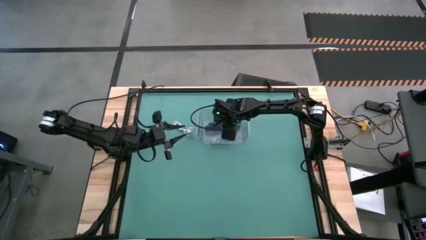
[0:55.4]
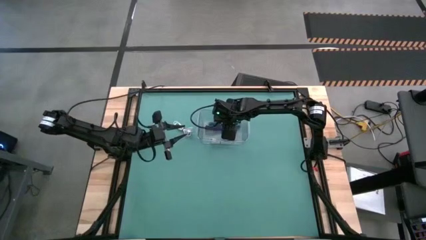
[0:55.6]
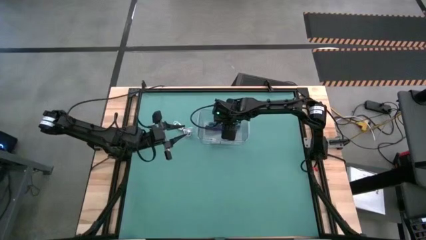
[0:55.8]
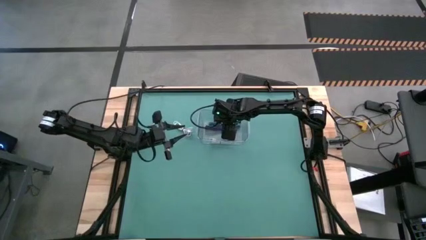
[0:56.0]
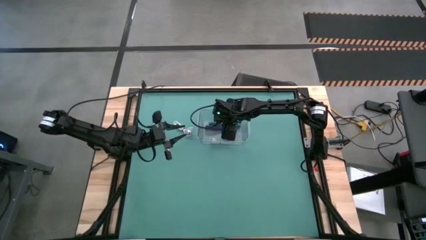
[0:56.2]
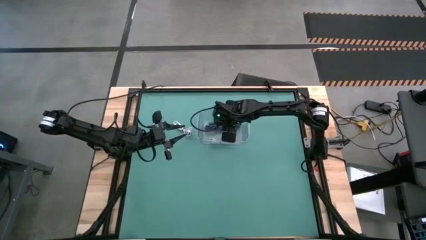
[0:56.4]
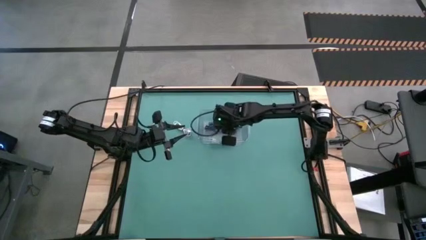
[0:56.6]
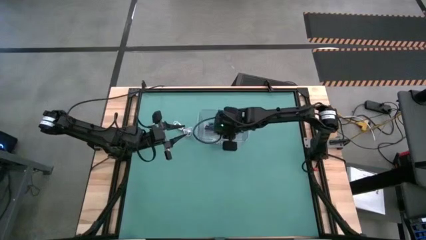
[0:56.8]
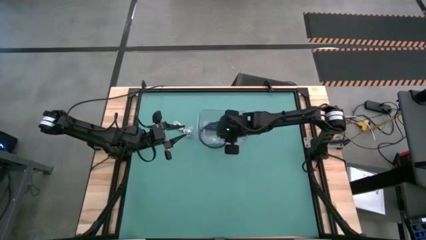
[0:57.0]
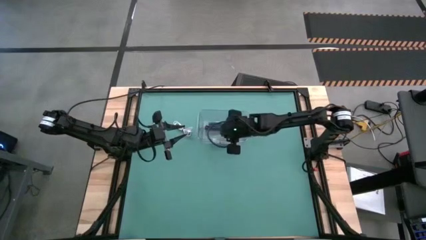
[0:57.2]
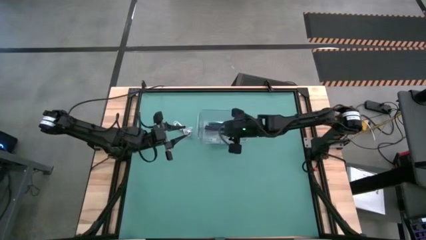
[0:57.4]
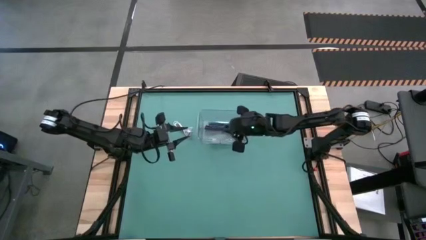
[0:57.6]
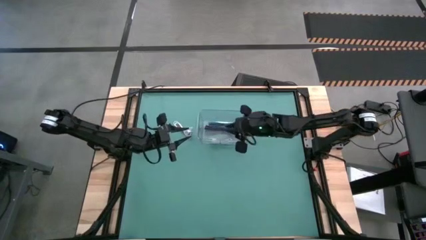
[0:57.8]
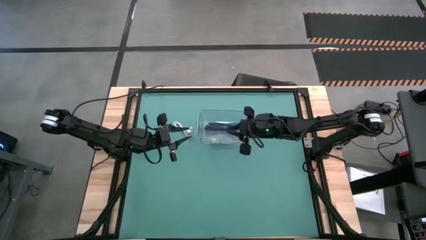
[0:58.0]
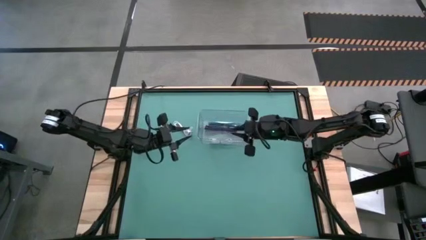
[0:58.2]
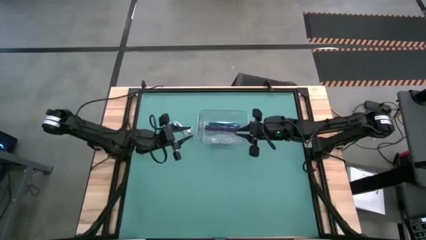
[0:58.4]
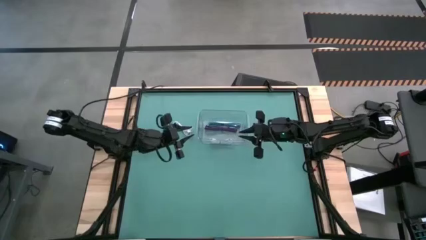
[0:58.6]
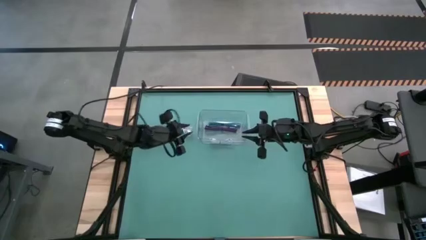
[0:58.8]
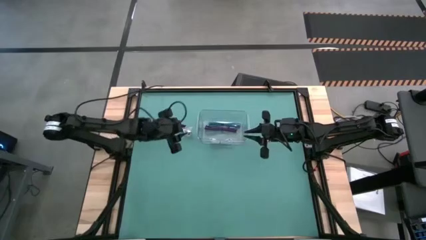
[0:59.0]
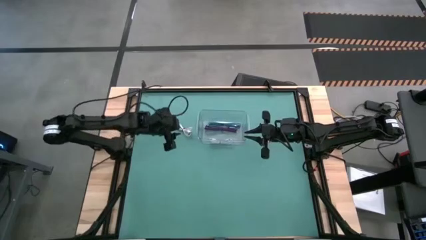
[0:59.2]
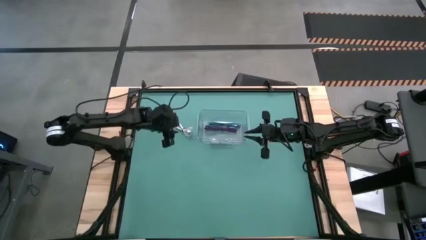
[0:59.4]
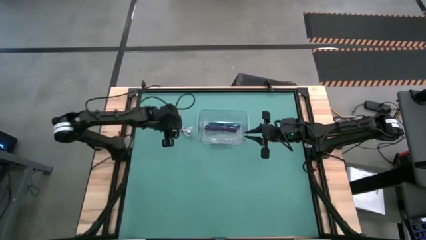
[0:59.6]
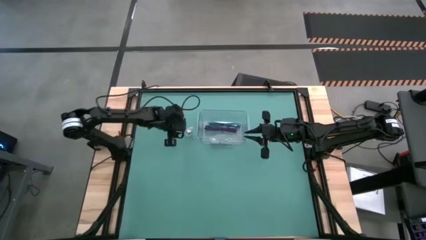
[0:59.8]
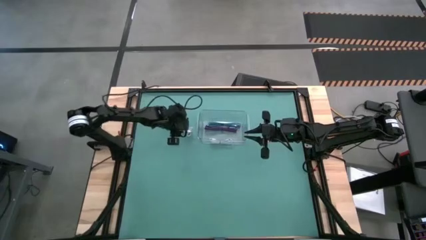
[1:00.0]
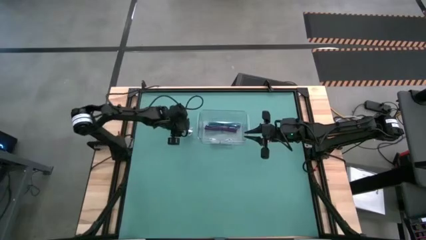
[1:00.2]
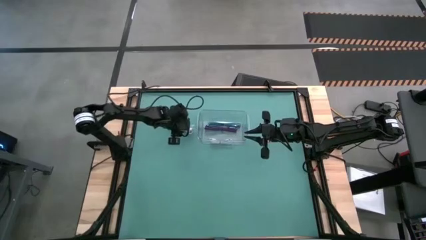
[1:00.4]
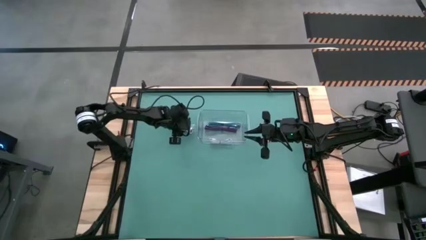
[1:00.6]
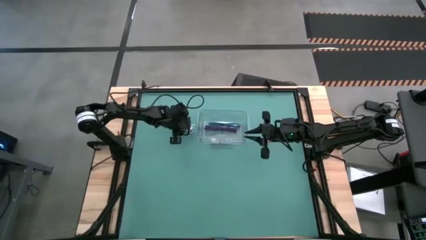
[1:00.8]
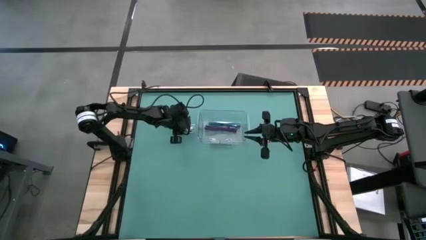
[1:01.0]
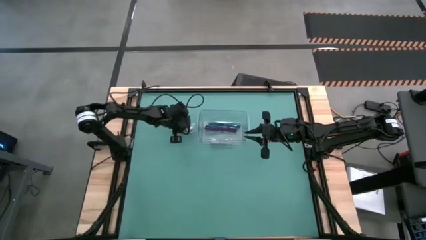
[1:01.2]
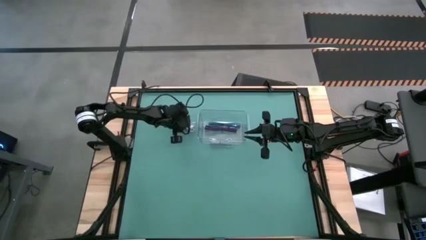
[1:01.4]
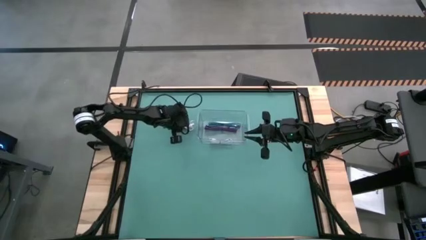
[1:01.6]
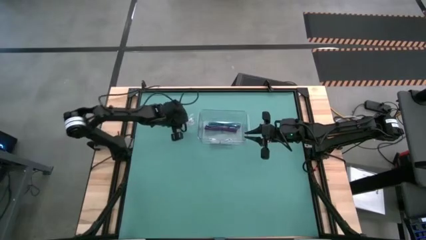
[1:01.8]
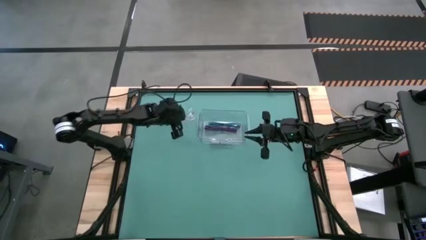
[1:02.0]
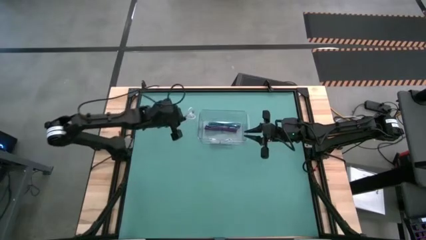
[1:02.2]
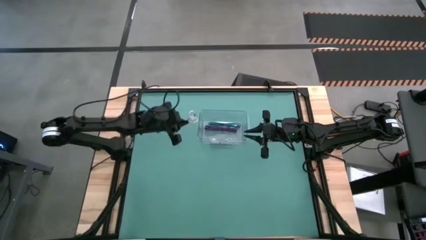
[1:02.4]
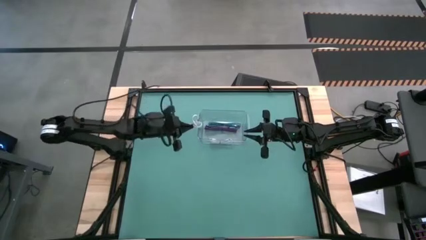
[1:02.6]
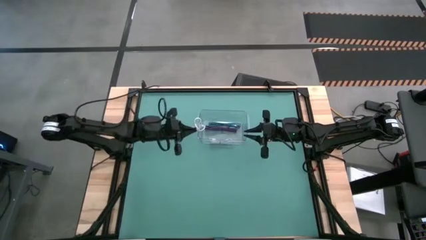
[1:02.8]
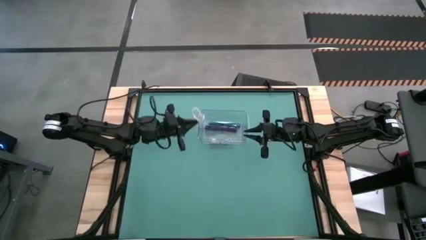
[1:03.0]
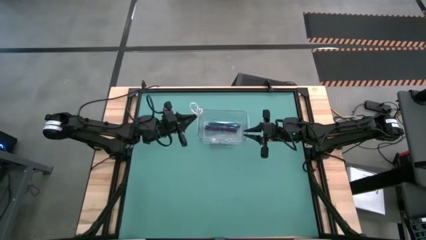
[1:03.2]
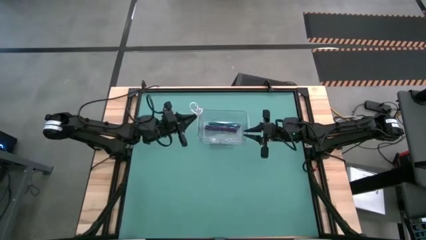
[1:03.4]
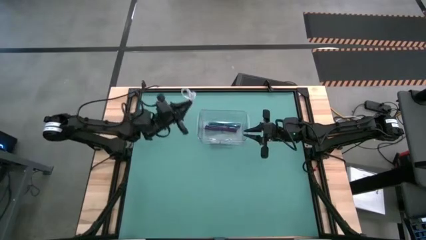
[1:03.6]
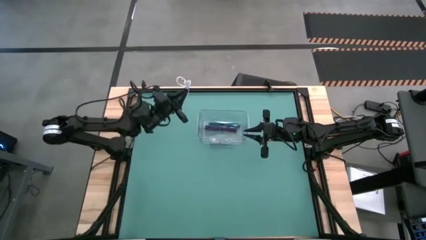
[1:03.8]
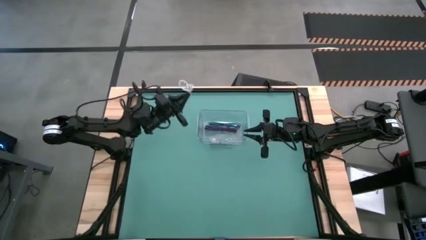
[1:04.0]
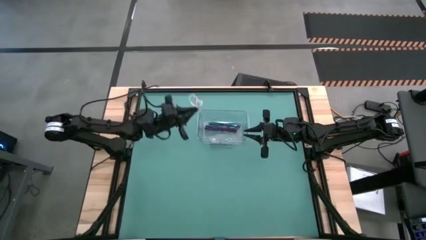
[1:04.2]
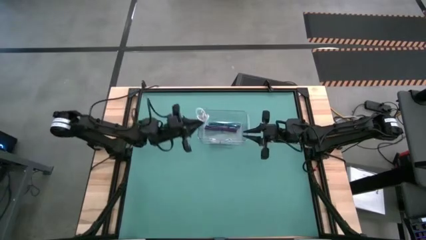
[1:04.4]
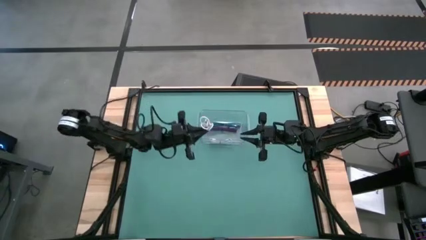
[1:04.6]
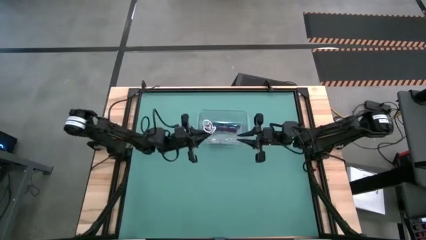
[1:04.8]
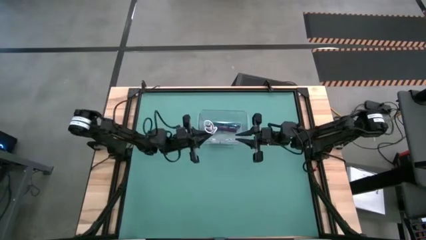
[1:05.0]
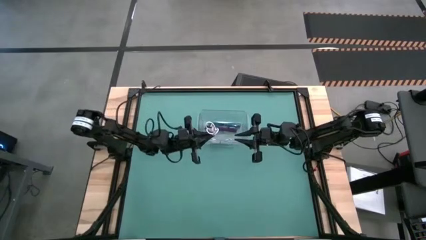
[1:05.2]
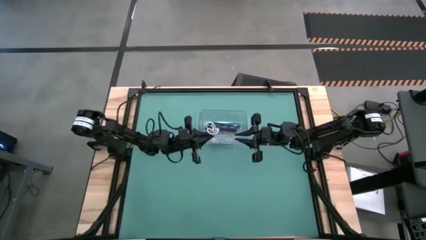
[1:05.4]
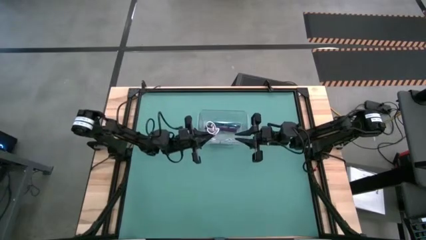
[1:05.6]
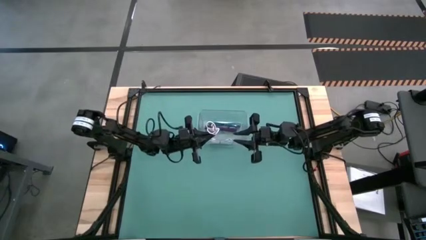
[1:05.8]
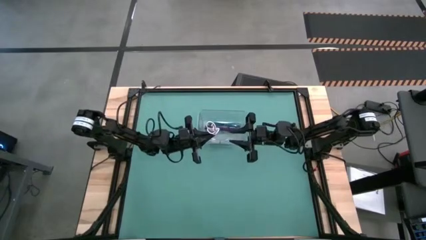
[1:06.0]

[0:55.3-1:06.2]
Task: Pick and place USB-C Cables
Put the white charger cable into the transparent container

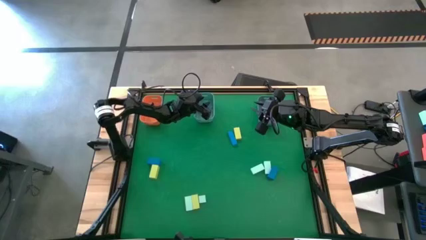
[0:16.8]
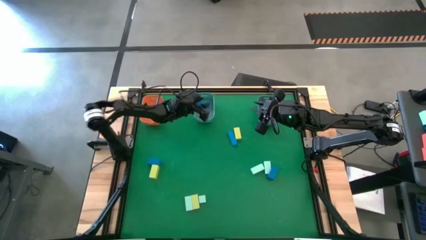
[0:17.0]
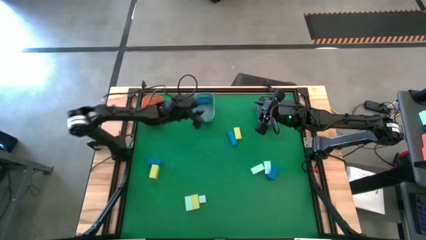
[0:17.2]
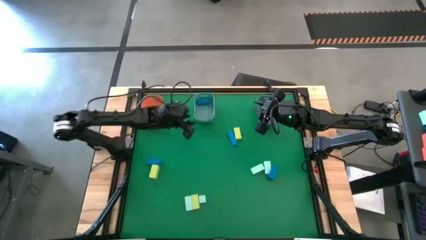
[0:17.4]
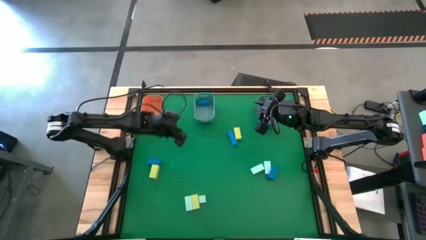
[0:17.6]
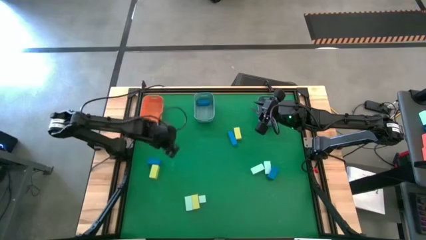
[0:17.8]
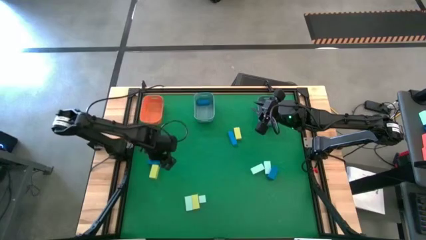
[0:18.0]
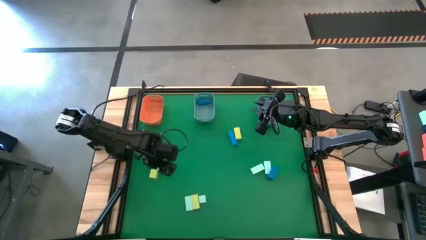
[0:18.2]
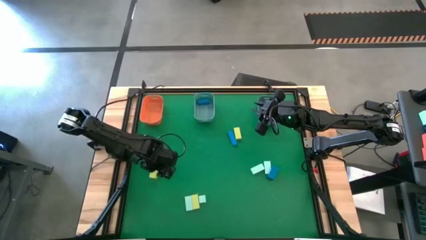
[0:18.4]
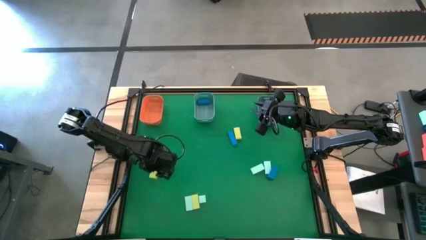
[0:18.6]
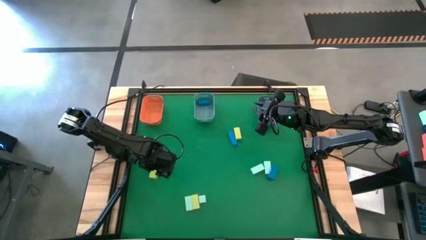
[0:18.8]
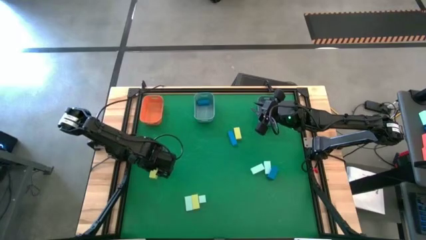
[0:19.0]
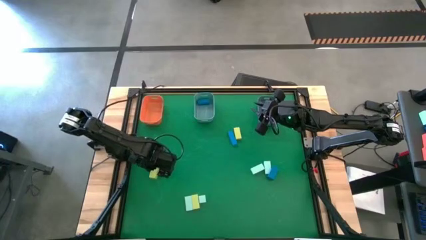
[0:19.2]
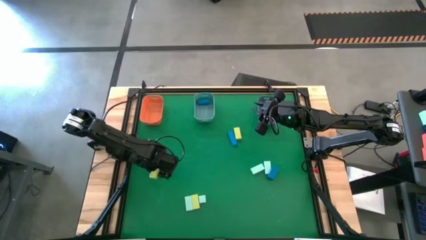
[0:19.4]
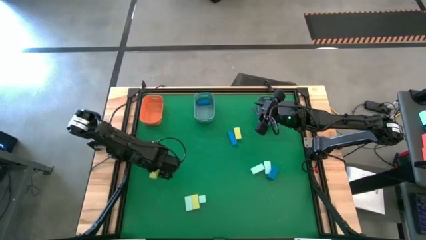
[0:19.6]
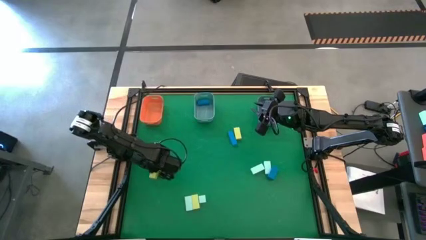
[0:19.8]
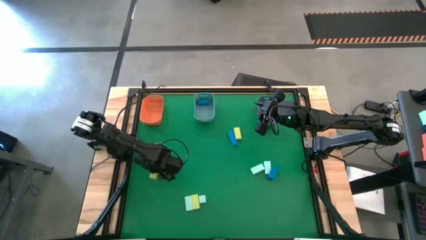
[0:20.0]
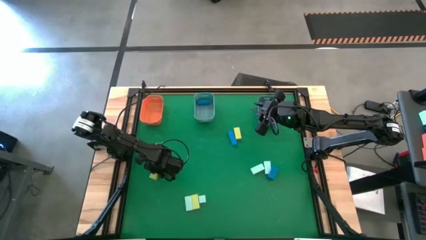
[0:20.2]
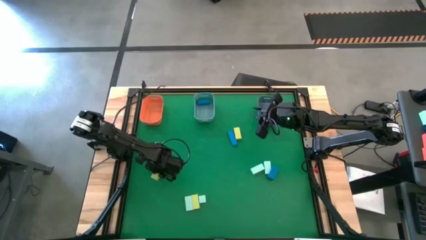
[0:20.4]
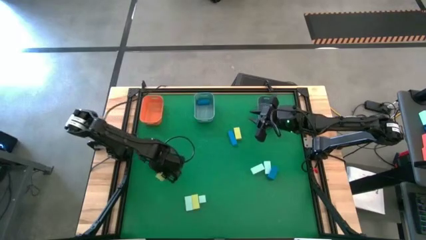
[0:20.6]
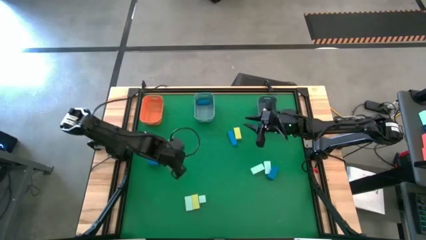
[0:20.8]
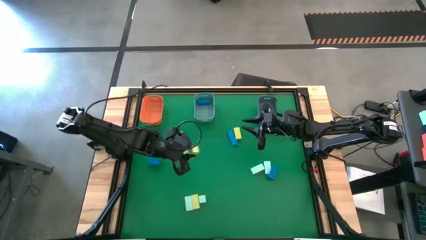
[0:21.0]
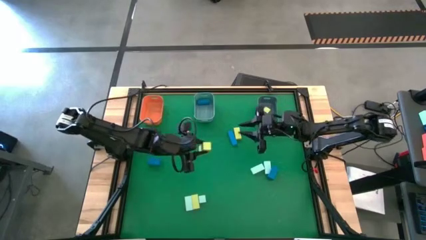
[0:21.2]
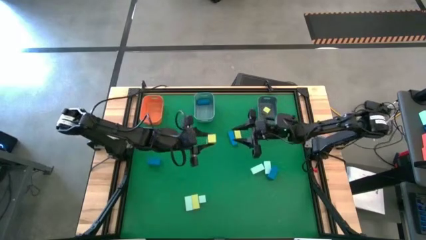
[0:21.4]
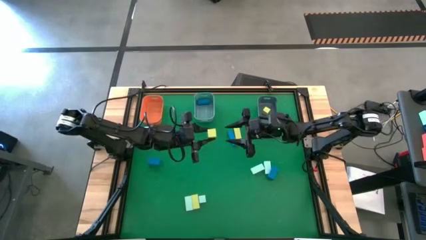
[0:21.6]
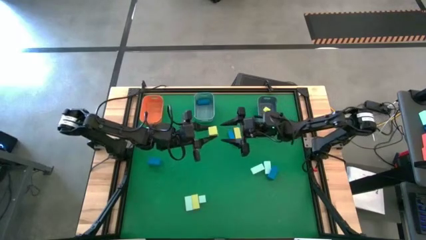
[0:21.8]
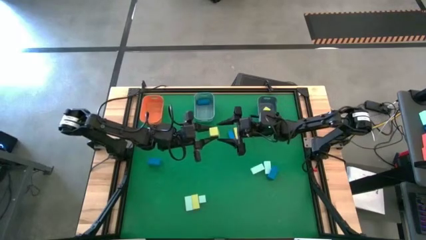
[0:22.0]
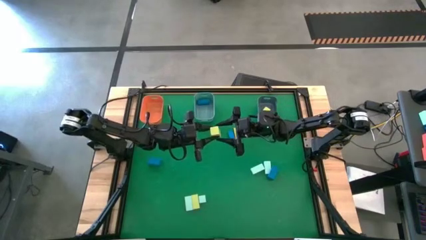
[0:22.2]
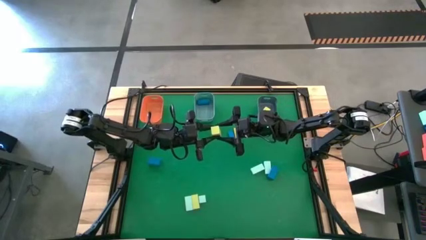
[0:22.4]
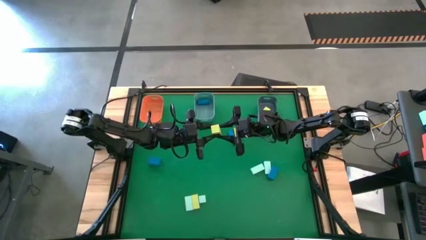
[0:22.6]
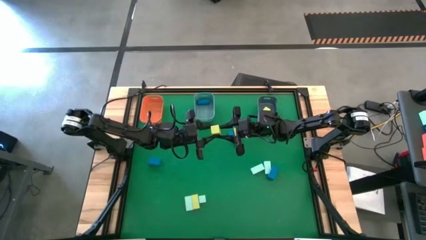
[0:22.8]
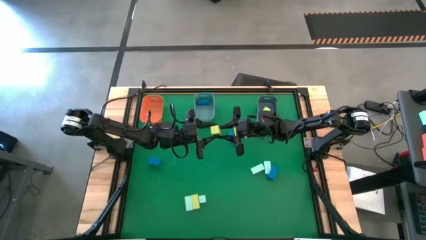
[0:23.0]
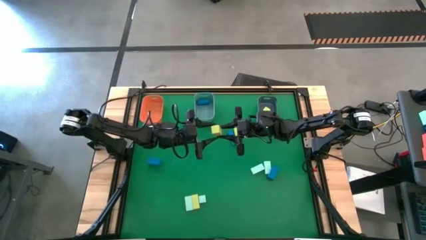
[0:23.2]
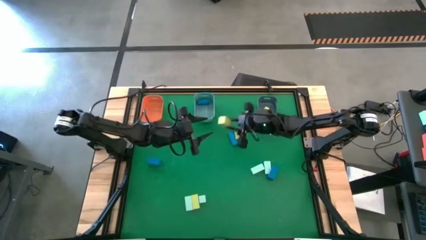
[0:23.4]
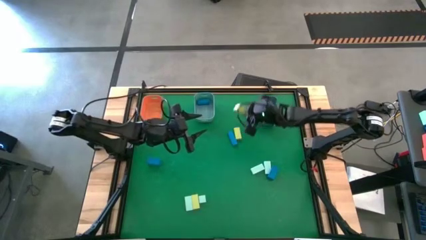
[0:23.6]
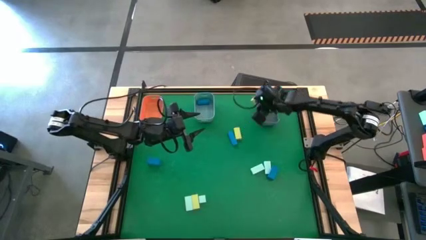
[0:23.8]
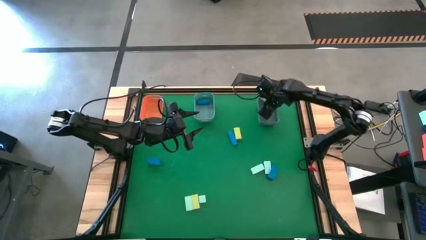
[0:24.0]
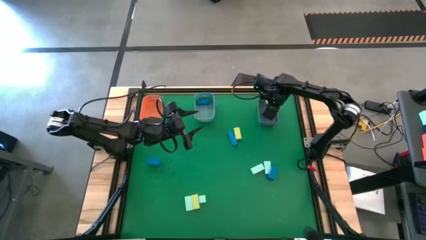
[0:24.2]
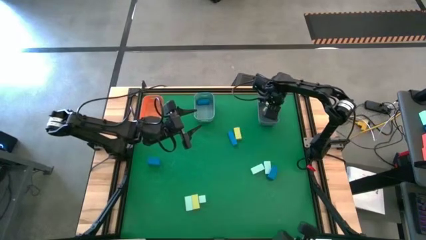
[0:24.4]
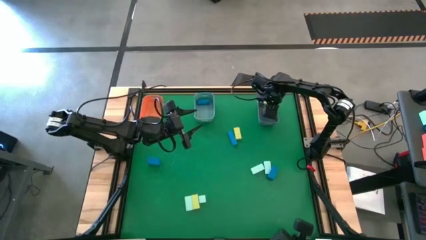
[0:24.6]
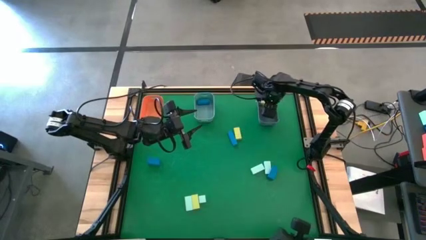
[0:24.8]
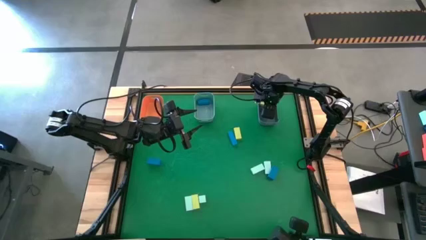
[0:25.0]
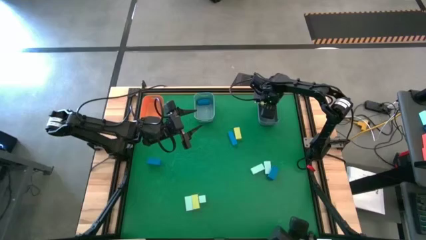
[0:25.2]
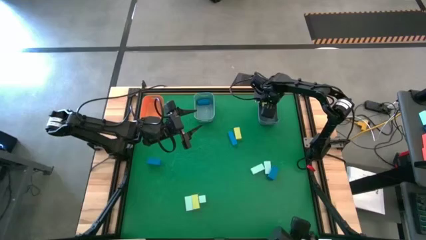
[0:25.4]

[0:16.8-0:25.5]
Task: Sort & place blocks by color
Put the yellow block into the gray bin
